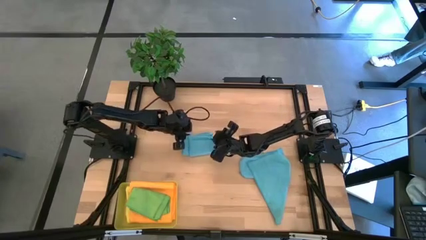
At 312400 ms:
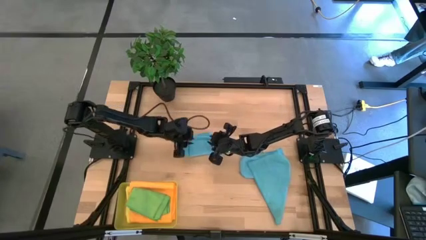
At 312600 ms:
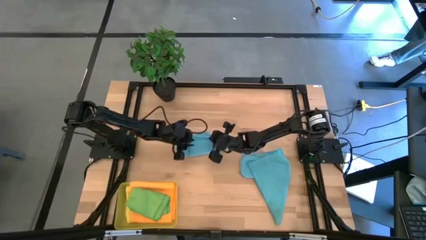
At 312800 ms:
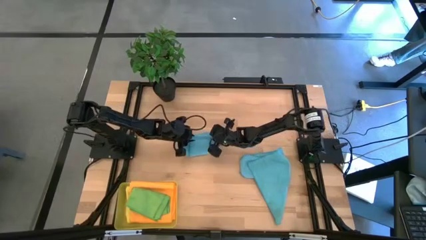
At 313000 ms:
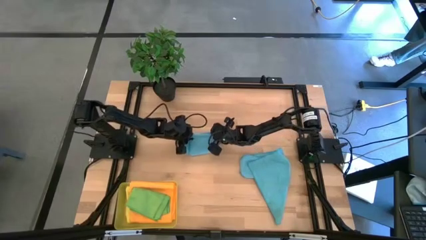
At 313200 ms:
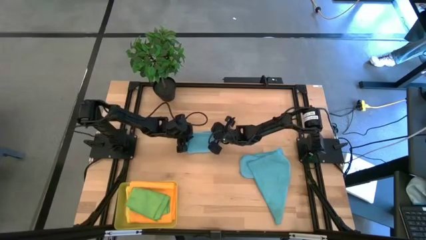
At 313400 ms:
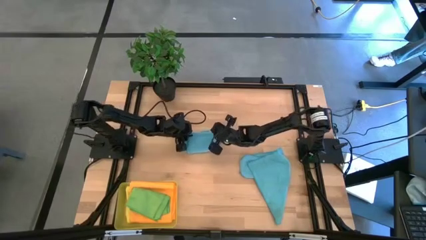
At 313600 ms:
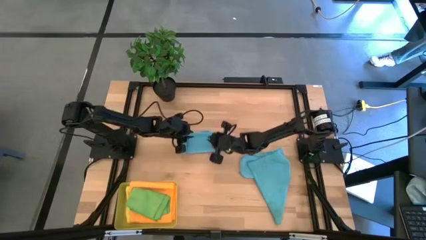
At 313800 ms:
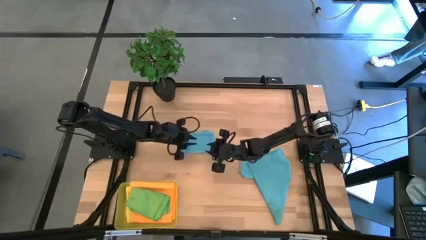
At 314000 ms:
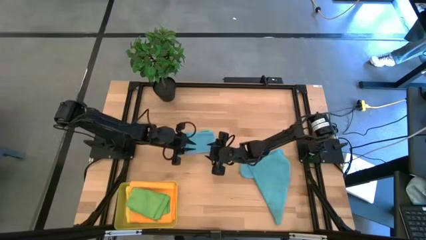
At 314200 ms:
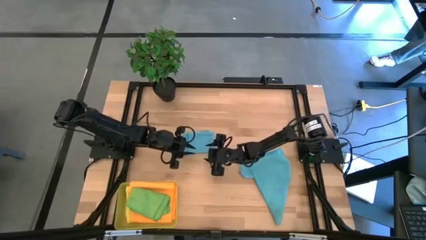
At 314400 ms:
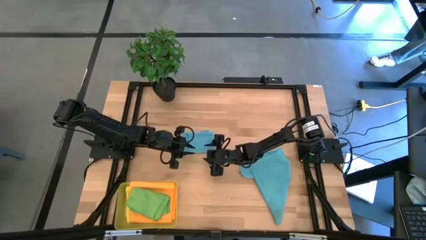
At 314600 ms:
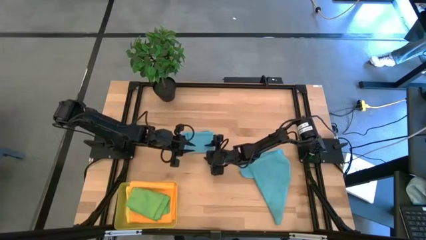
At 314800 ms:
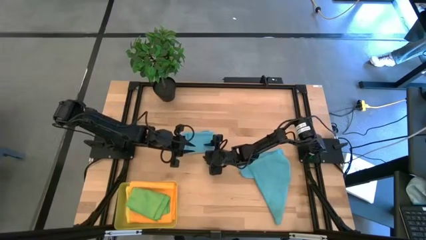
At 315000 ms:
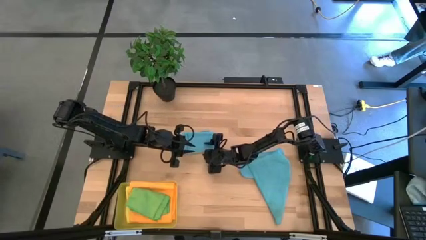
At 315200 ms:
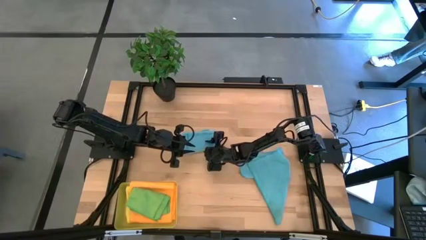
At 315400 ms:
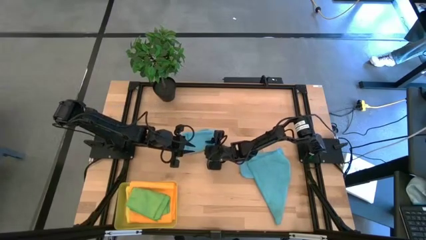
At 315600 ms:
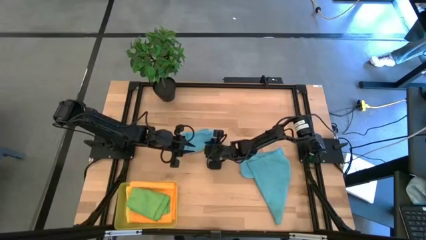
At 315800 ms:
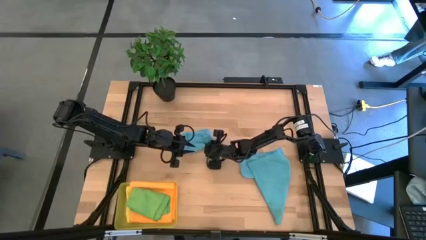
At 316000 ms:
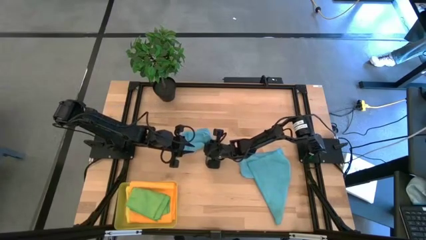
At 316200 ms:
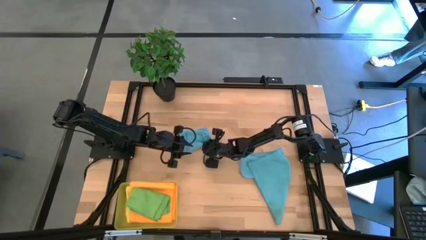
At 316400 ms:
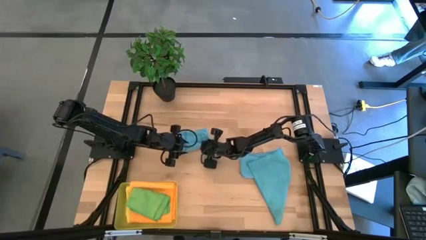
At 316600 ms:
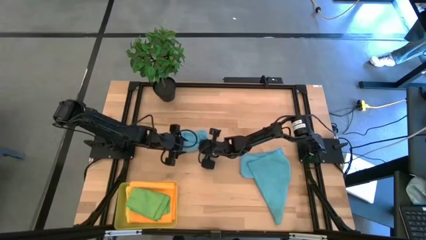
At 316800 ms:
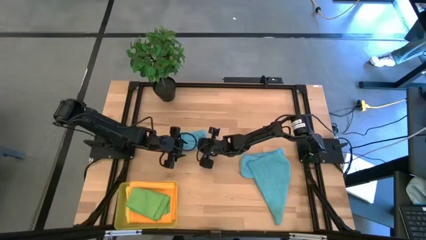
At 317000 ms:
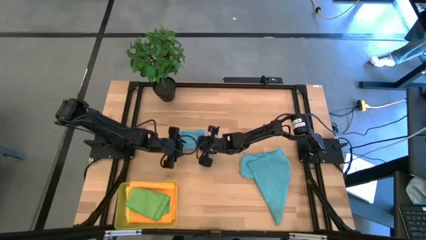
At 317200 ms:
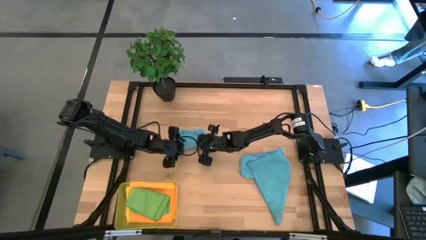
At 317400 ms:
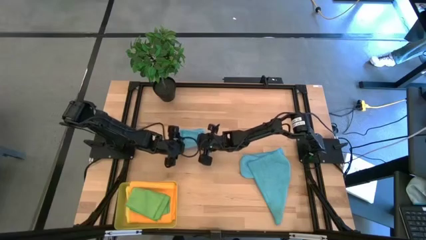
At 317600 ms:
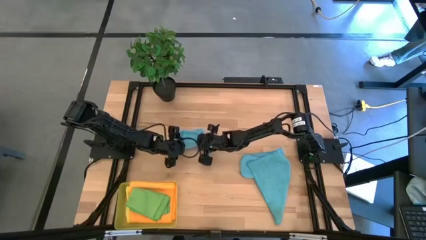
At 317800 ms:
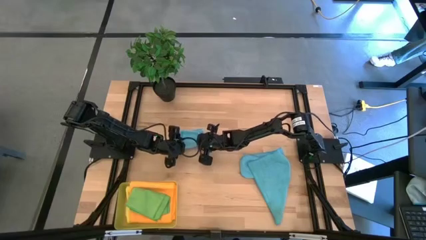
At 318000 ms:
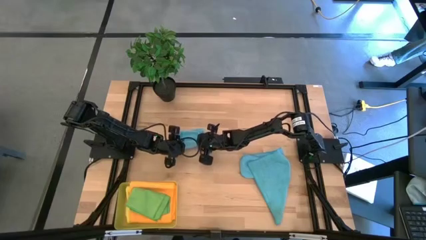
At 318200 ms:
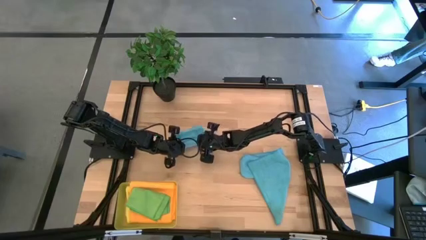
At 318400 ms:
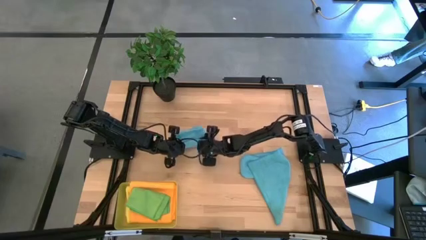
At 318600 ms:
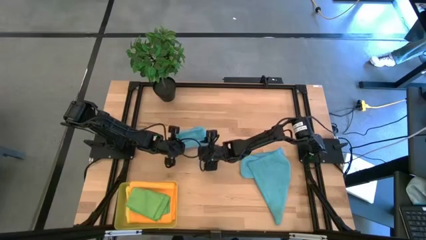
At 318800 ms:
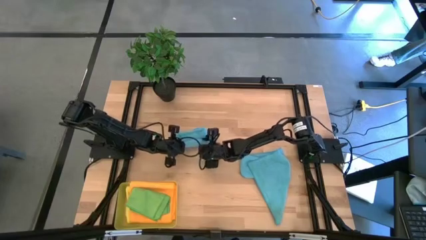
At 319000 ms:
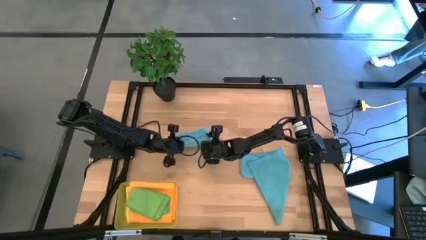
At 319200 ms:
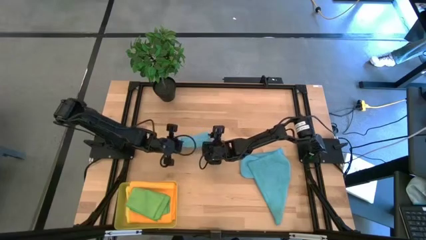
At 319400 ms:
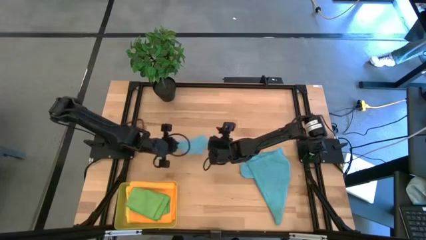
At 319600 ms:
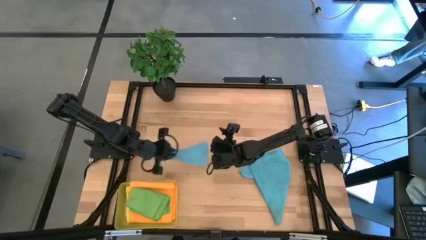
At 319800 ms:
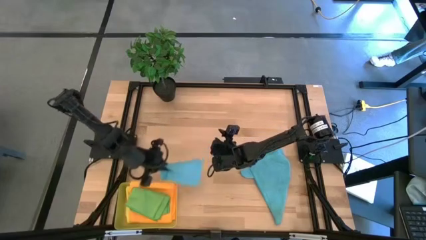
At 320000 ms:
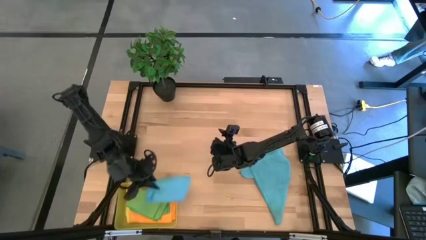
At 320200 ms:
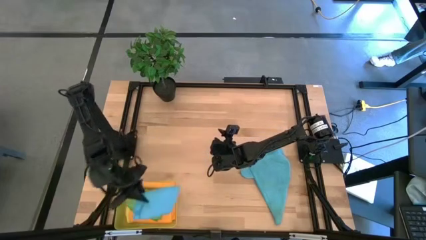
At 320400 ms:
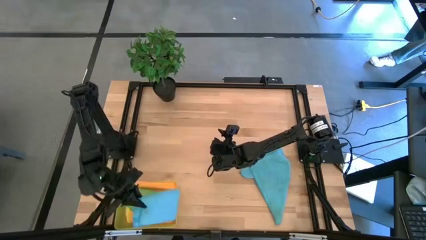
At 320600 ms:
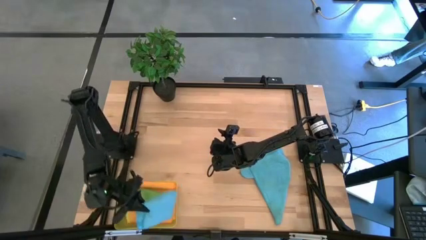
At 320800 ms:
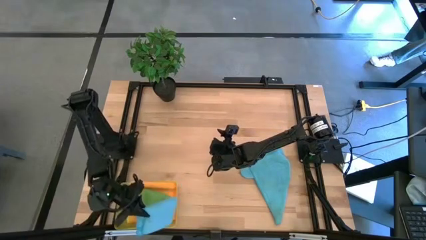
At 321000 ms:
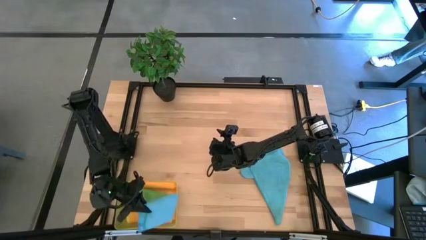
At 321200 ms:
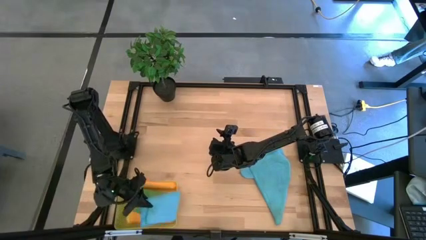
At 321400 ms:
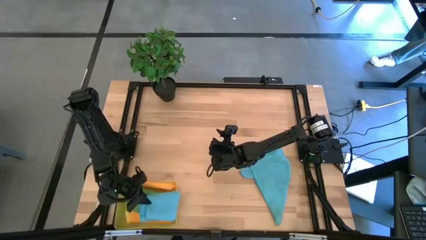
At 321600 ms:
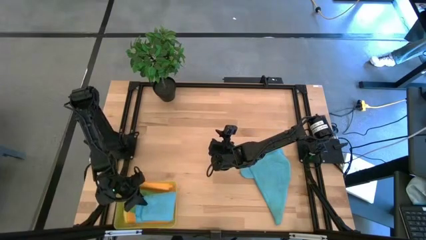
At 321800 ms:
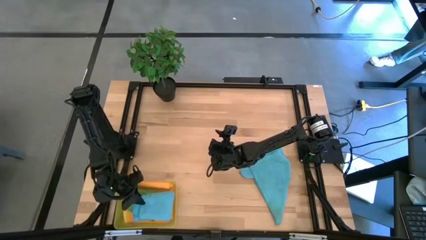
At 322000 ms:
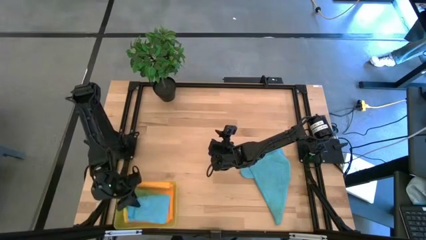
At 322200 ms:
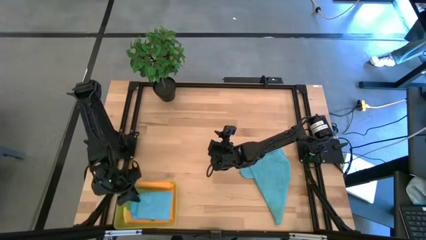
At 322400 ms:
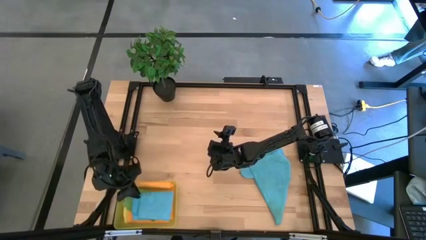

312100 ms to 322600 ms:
Task: Fold microfiber towels
Put the folded top blue microfiber cloth into the yellow bin
